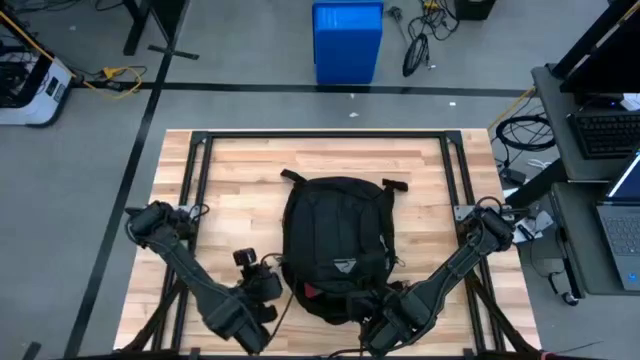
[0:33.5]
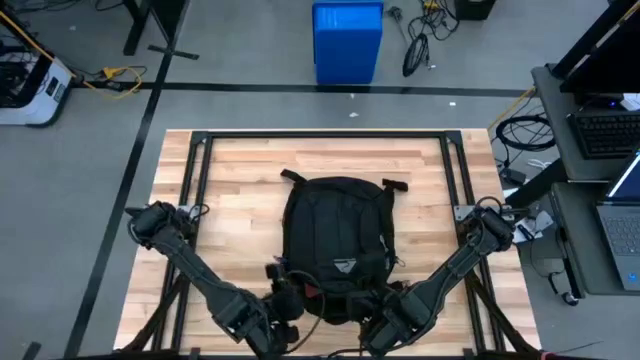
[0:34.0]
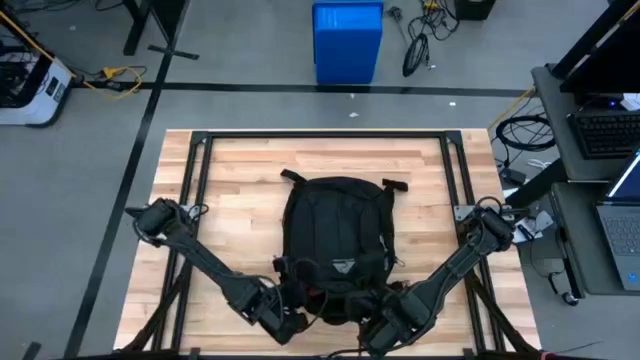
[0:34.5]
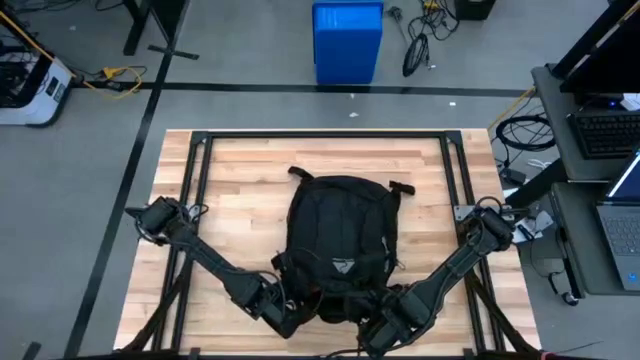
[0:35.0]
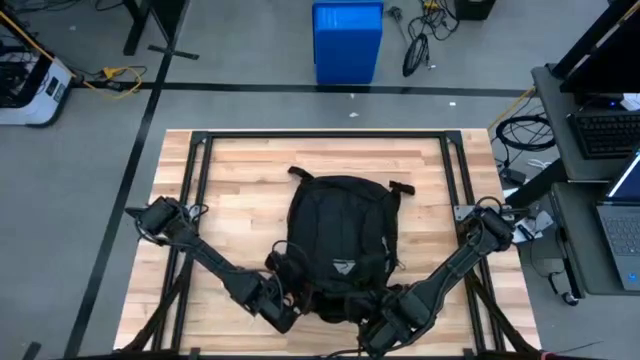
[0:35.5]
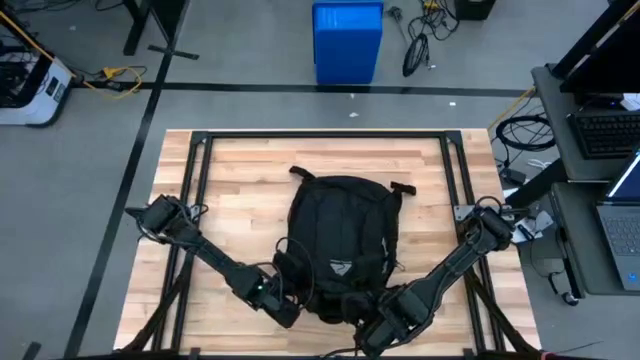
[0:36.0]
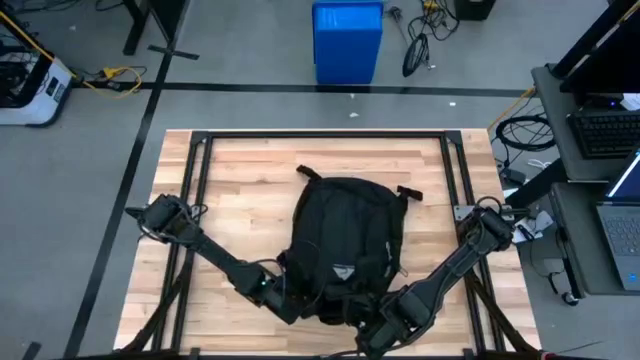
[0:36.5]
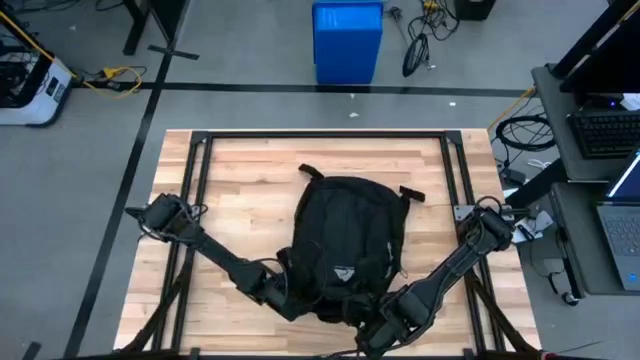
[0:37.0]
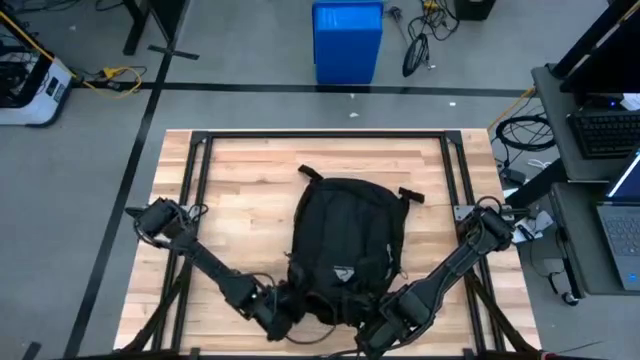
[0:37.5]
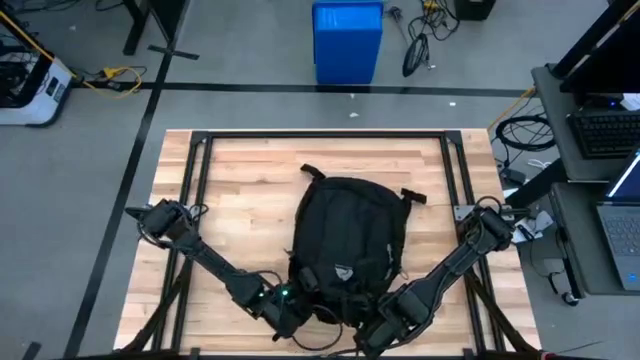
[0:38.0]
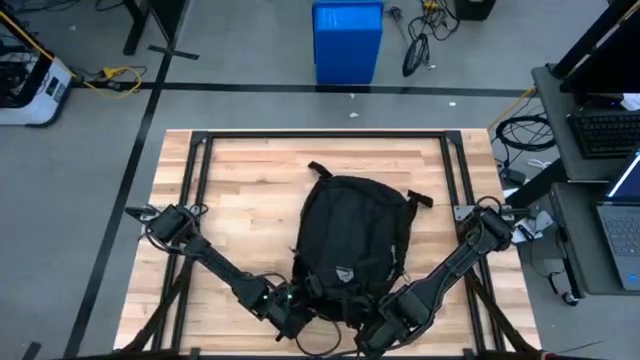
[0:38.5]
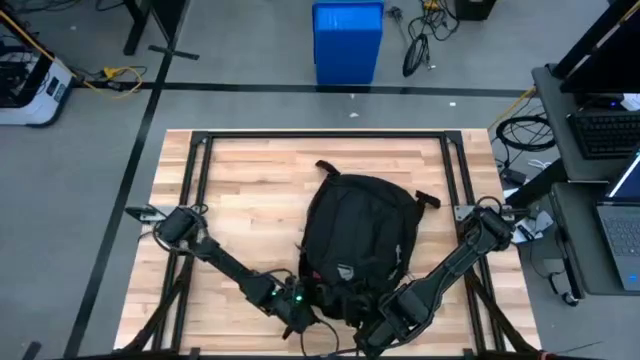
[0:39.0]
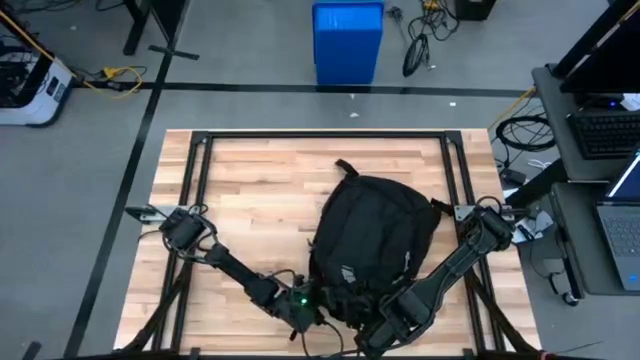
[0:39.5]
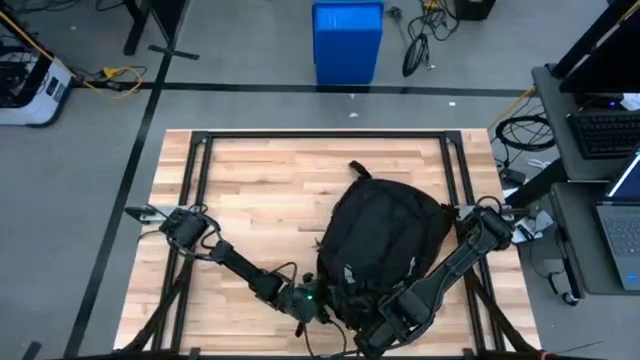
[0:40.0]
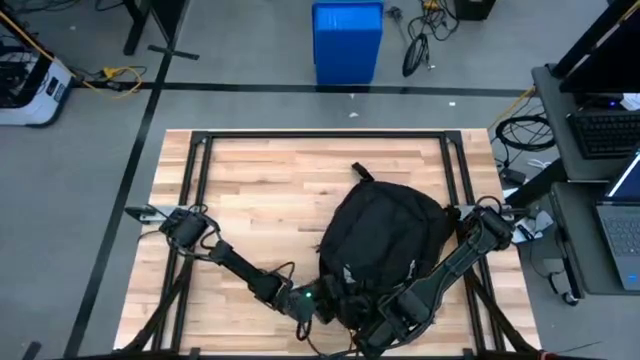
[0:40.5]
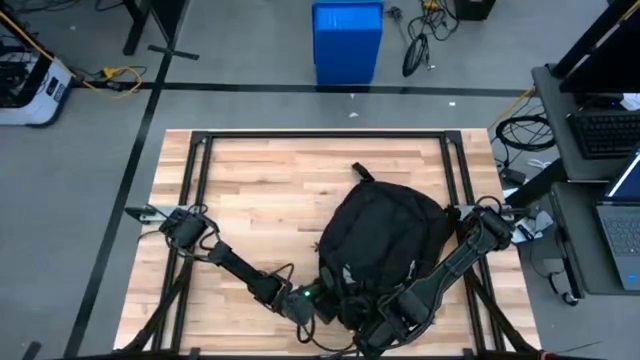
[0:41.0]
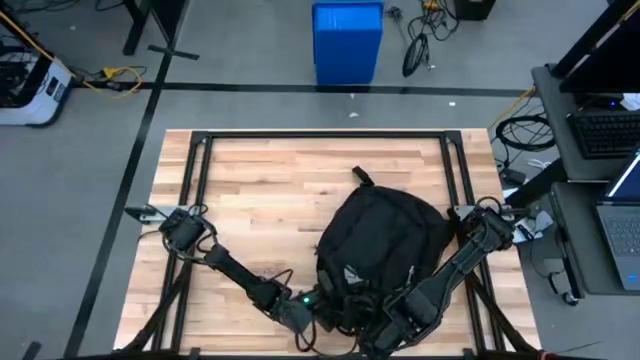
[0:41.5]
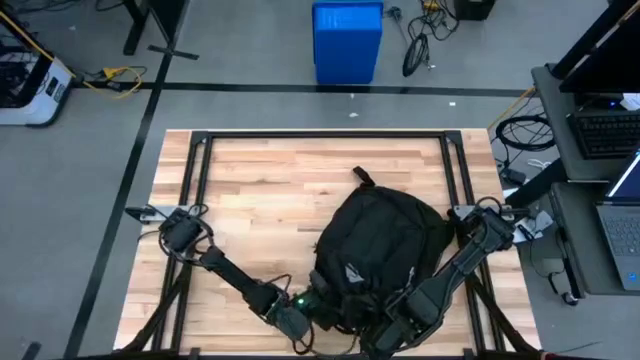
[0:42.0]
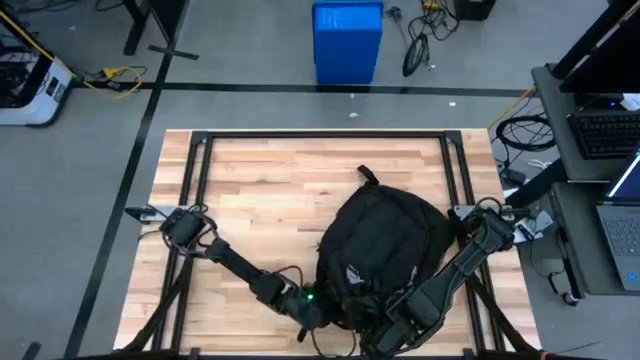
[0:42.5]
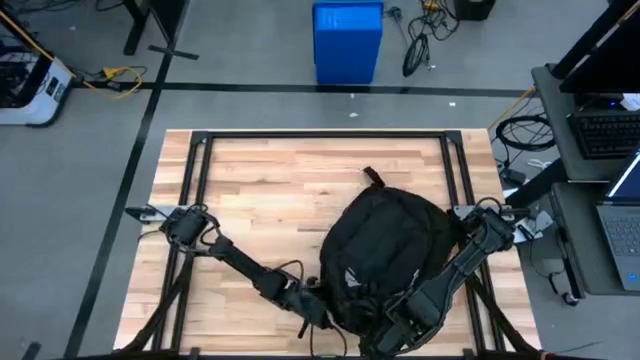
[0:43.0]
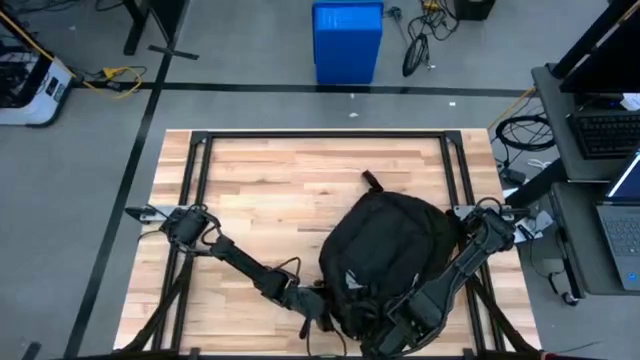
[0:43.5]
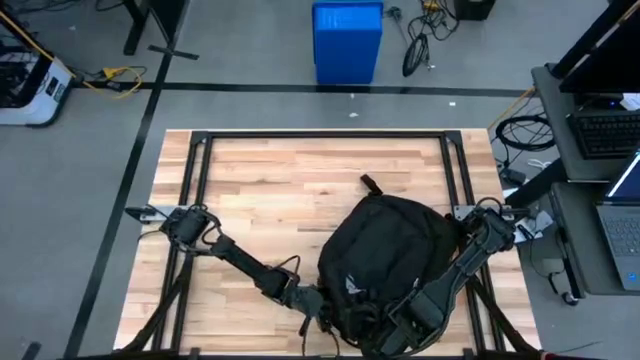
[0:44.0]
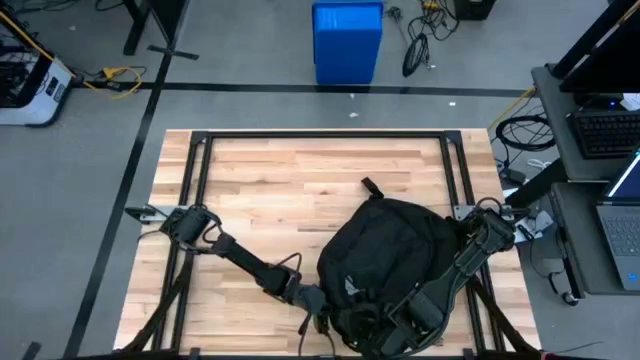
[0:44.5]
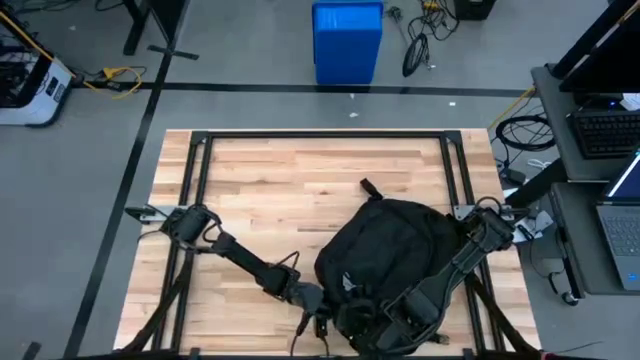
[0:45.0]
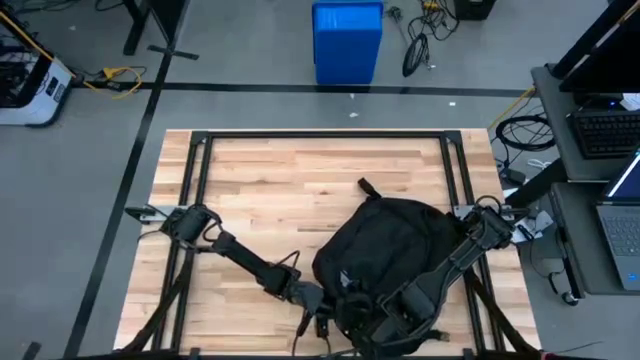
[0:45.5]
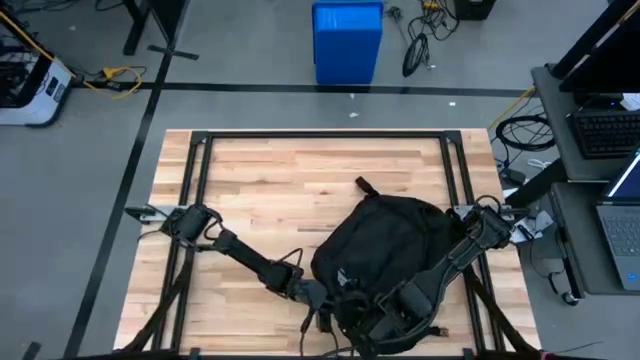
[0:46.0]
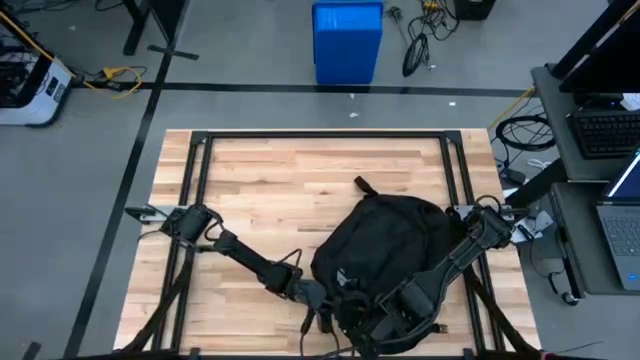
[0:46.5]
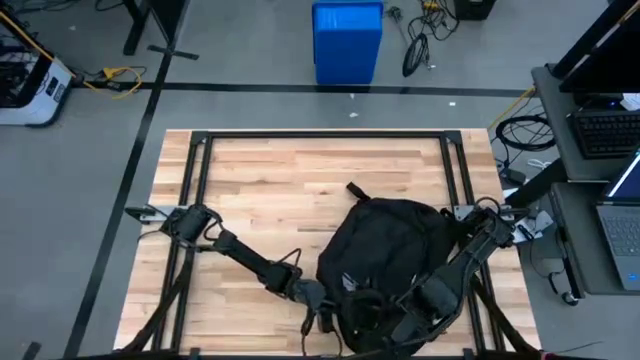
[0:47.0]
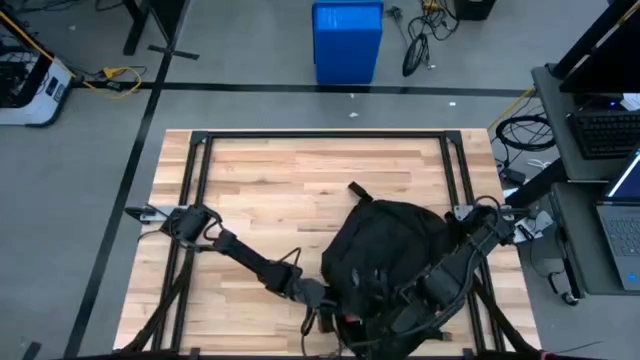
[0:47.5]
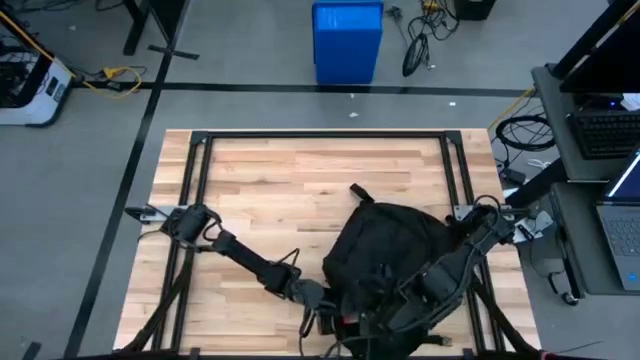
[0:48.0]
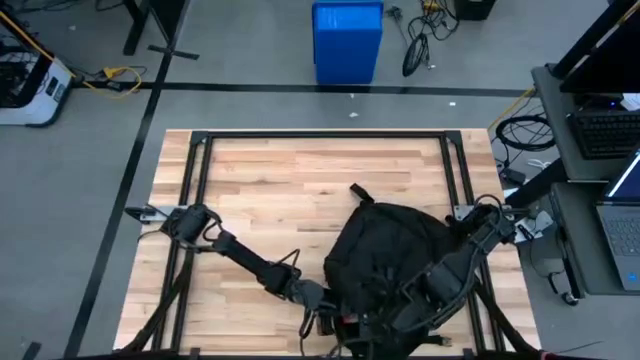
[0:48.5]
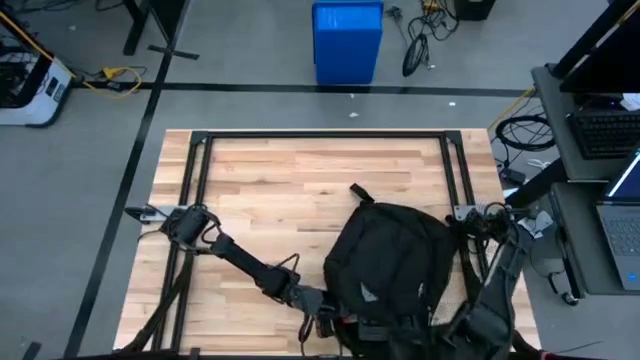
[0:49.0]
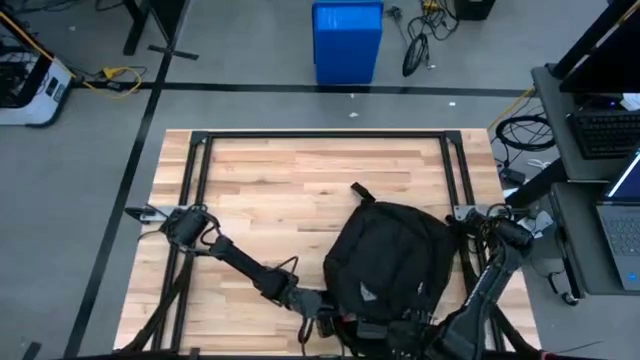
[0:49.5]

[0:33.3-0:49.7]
Task: Unpack backpack
Remove the black medicine organizer from the black backpack

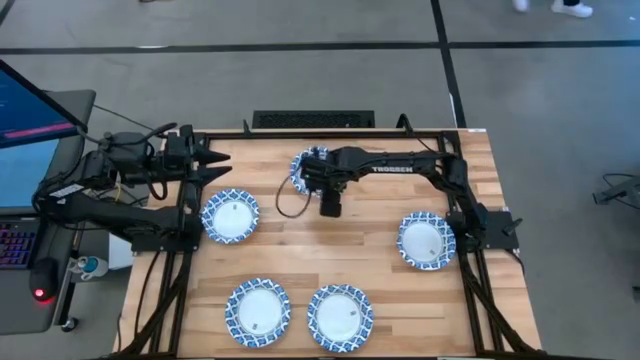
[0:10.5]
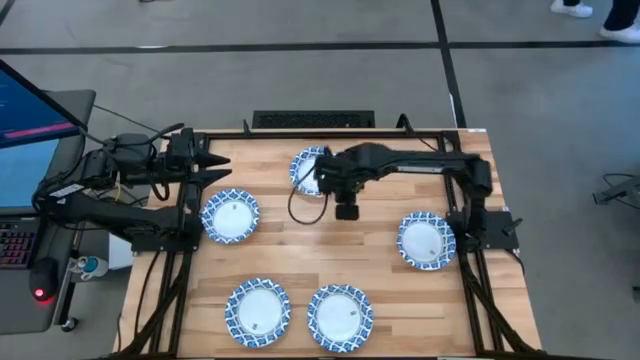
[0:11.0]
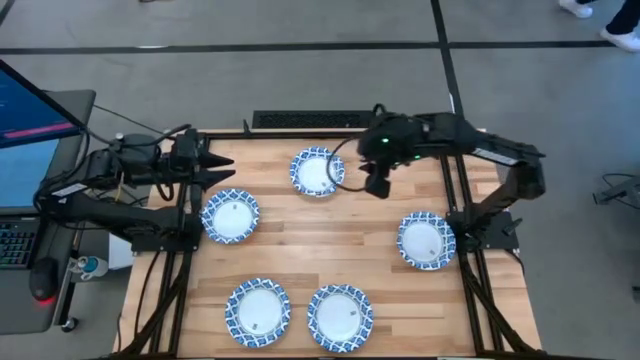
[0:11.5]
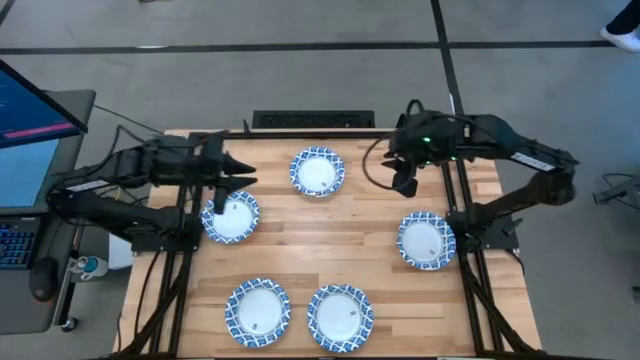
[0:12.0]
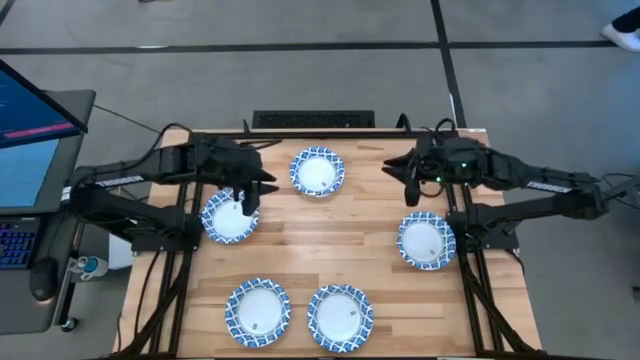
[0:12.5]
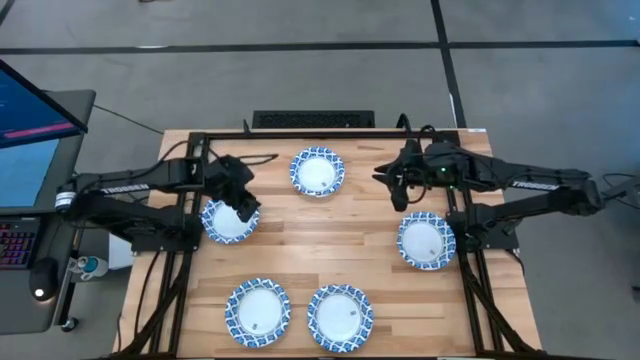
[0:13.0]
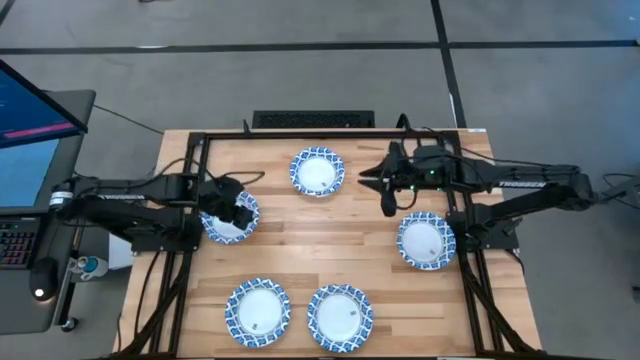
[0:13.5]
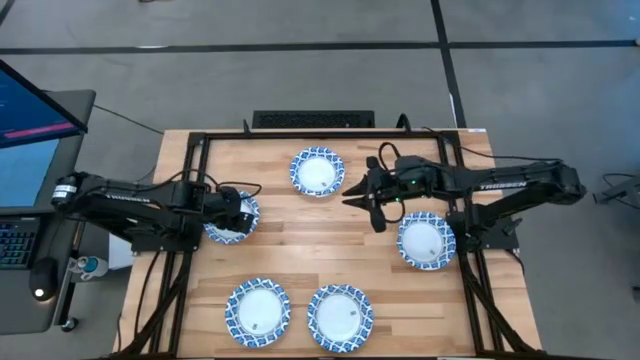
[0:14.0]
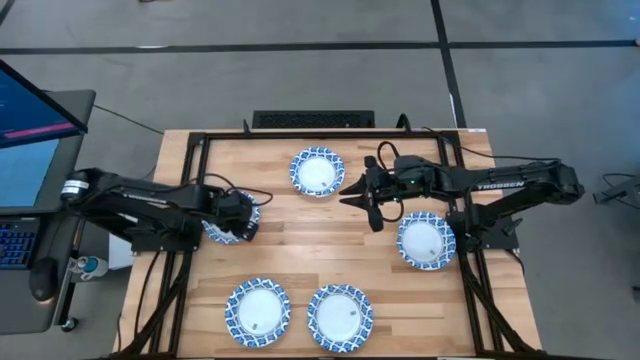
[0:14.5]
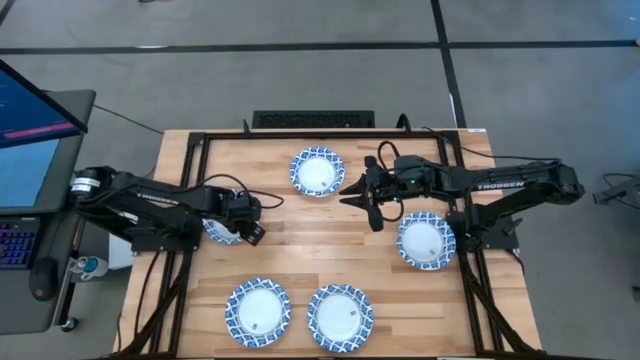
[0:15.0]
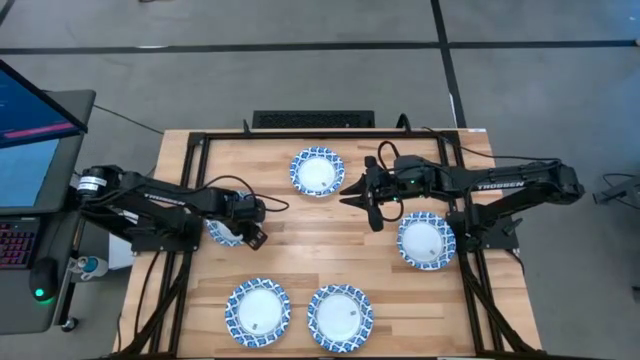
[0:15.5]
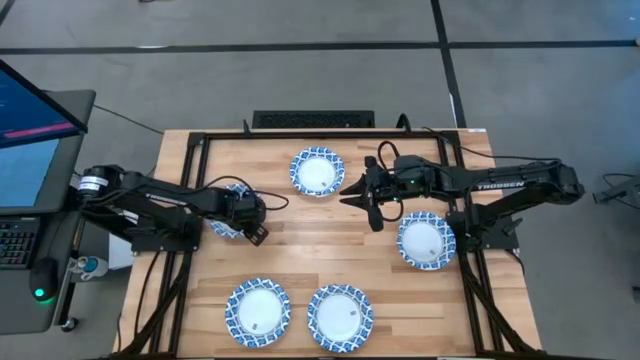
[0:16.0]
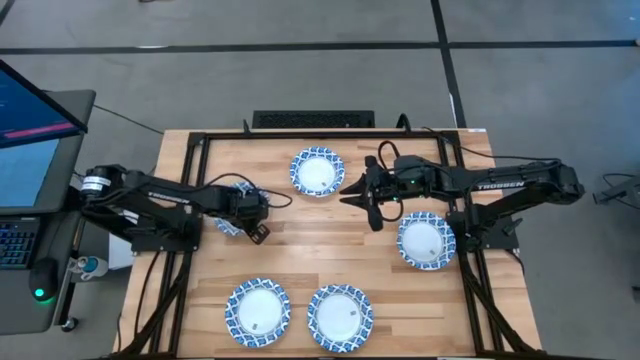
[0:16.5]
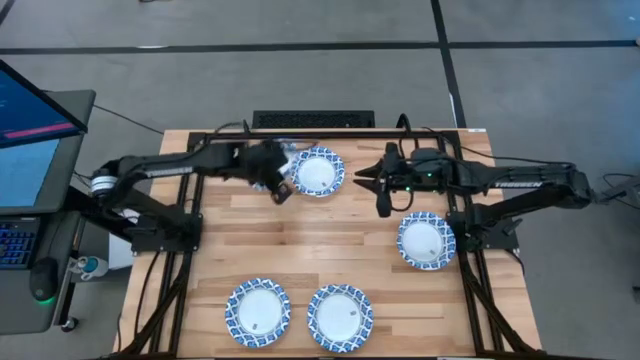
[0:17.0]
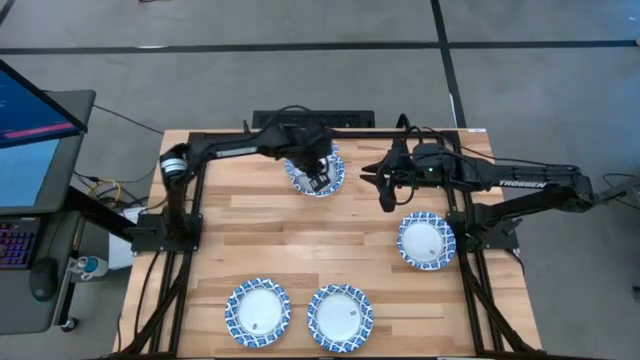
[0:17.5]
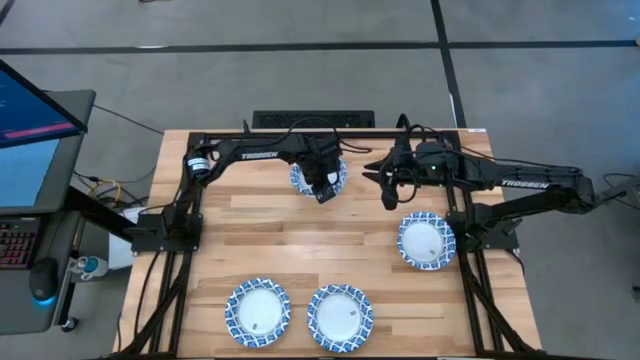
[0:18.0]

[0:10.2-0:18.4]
Task: Nest bowls inside each other
Stack the white bowl on top of the other white bowl
